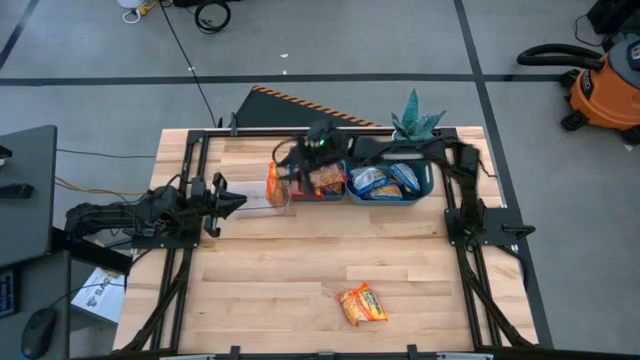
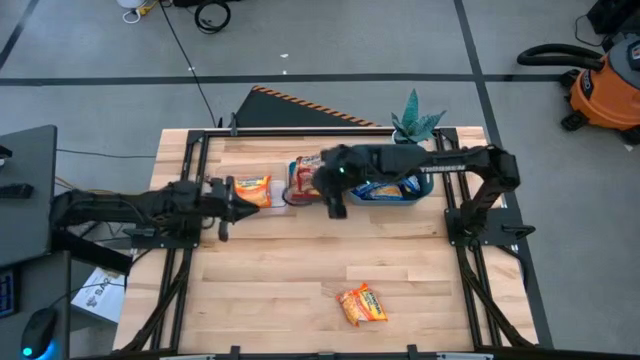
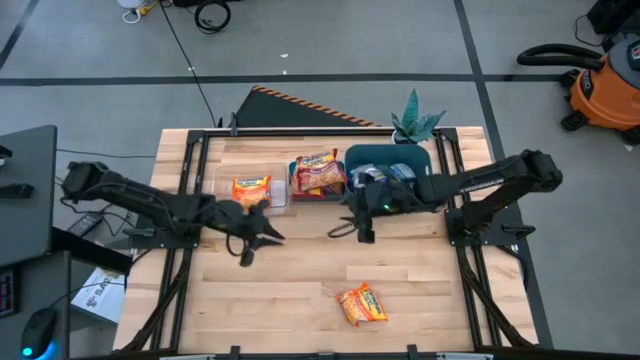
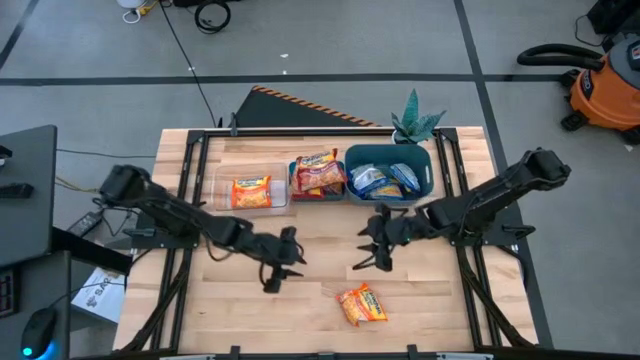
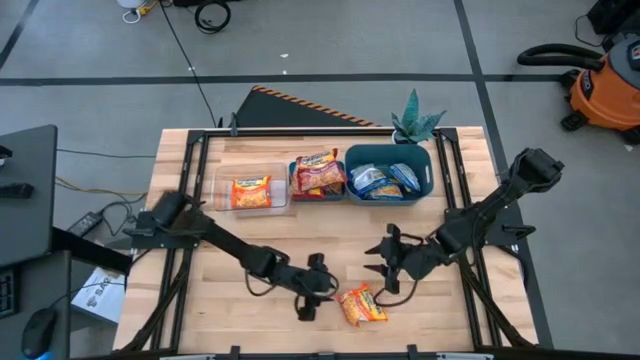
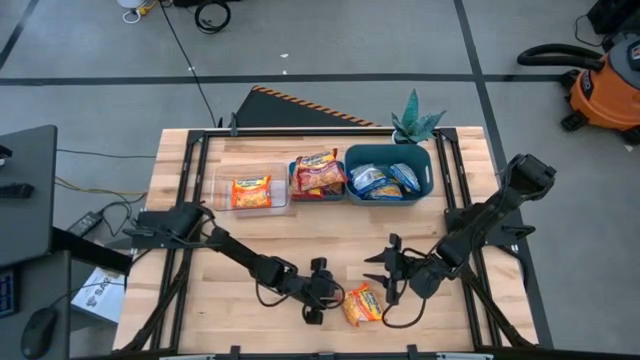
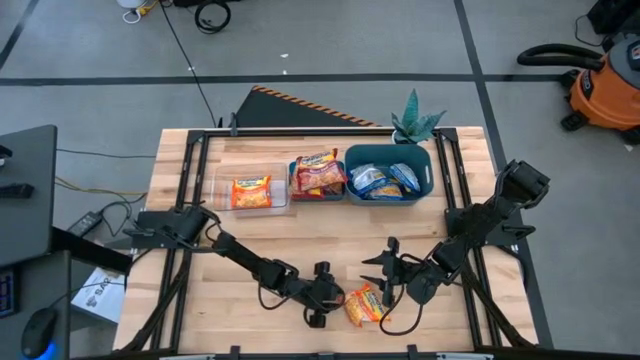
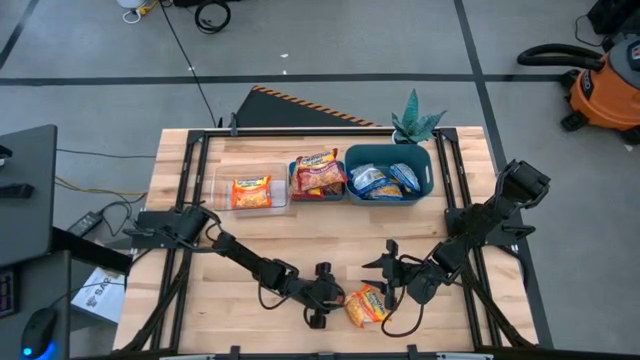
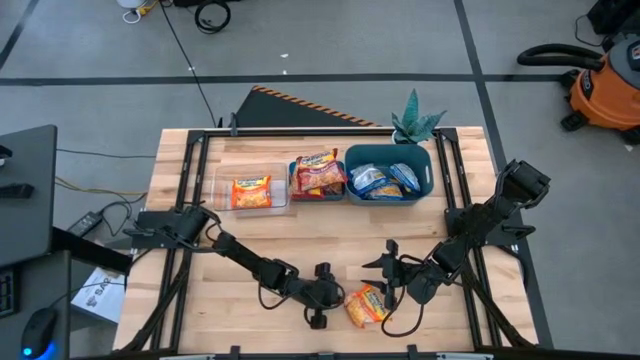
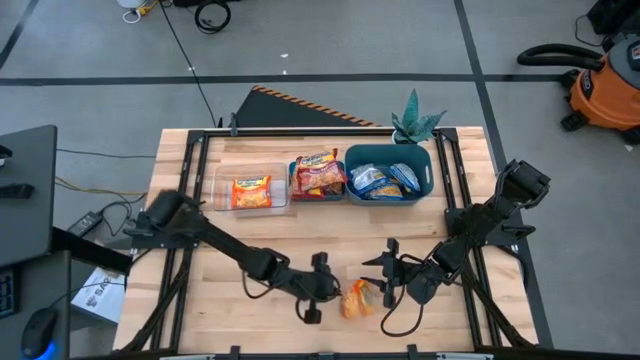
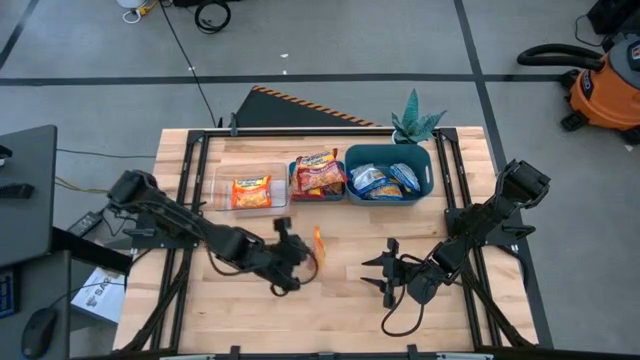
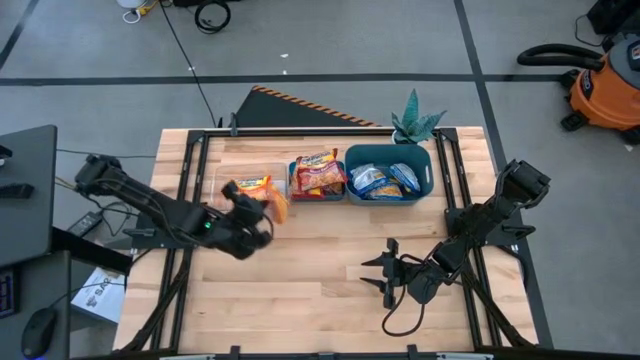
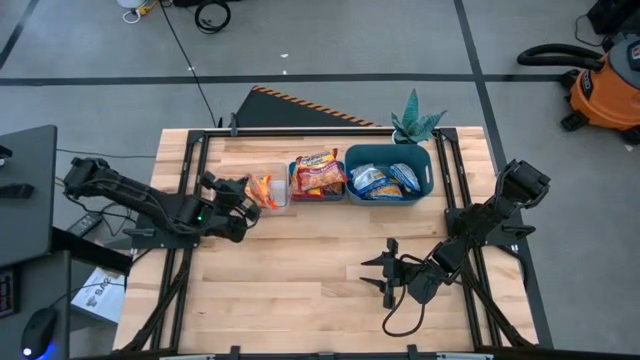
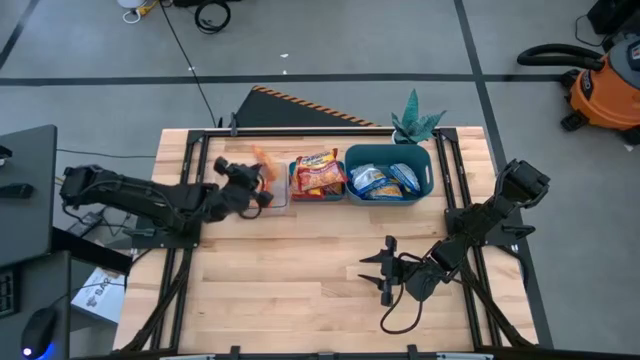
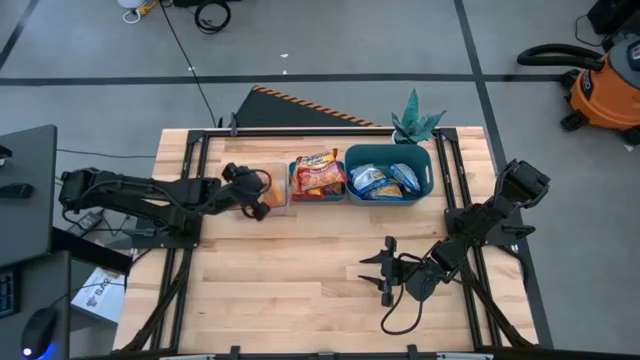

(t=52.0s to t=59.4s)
Task: Sort Maruchan noodles
Put the orange bag into the transparent bin

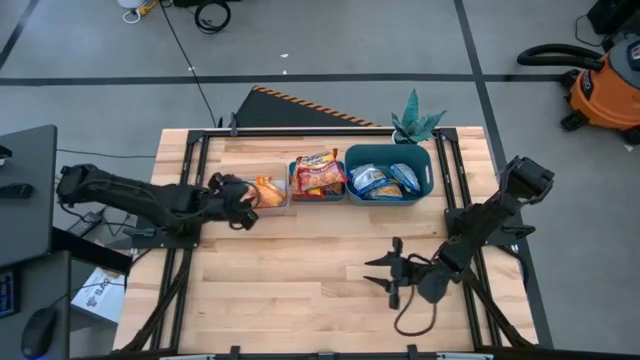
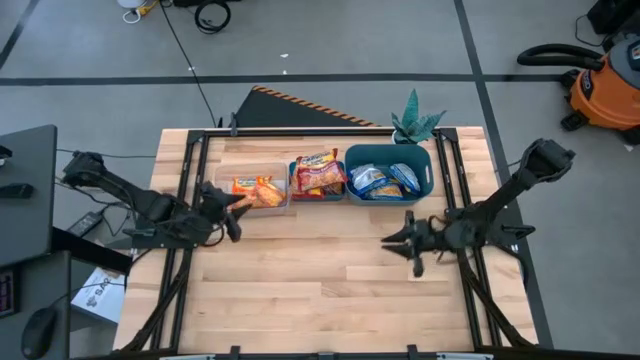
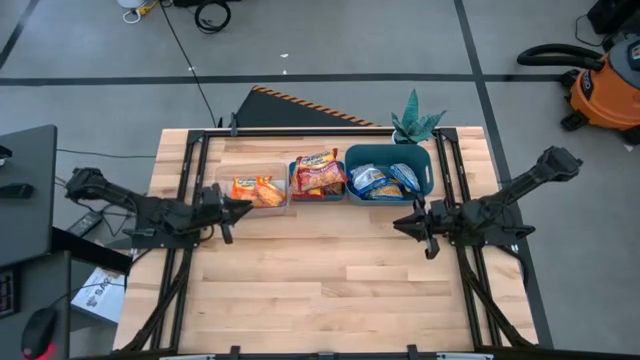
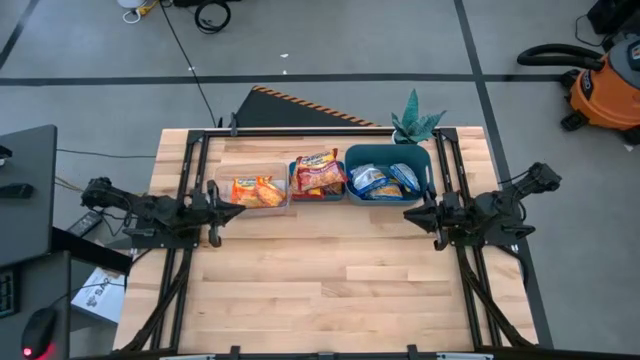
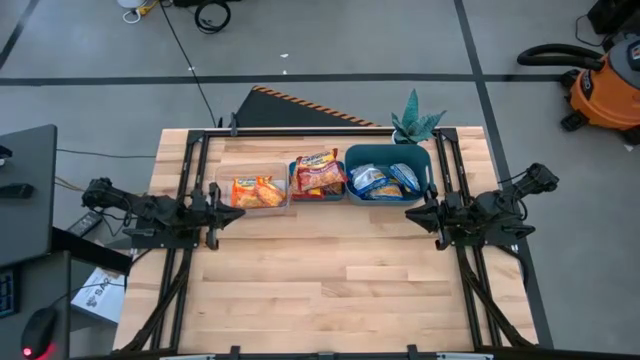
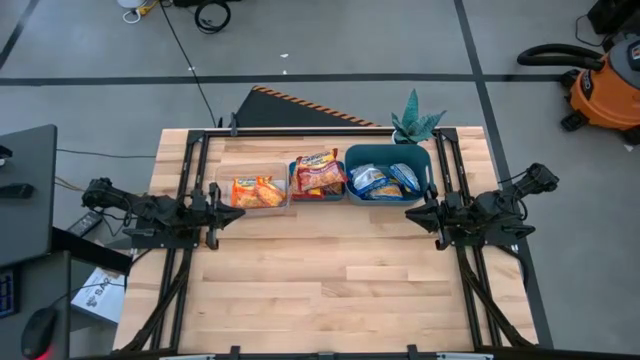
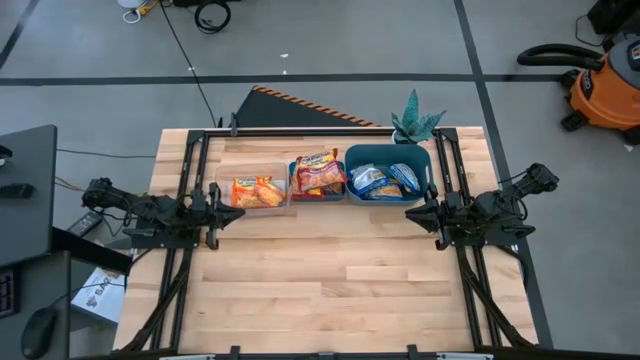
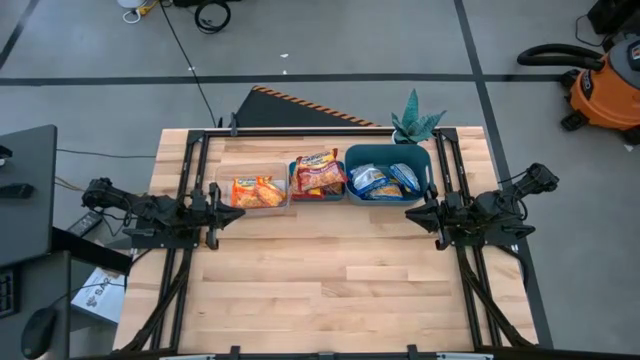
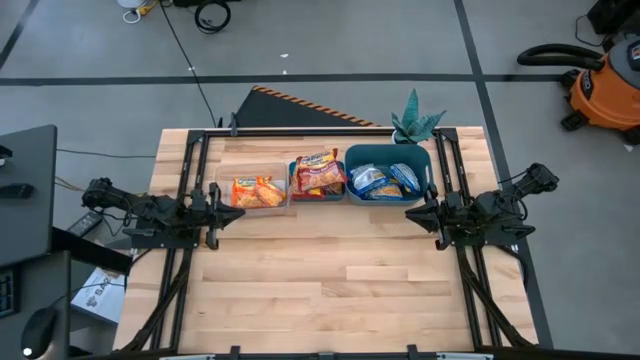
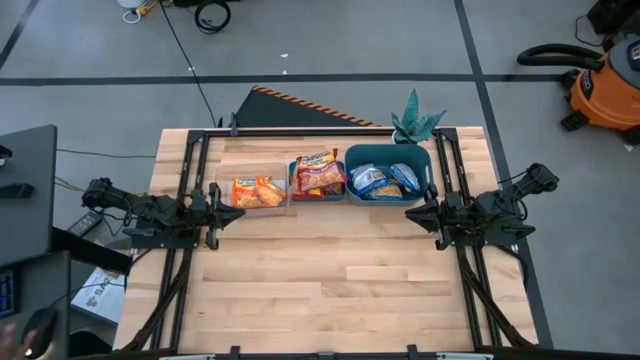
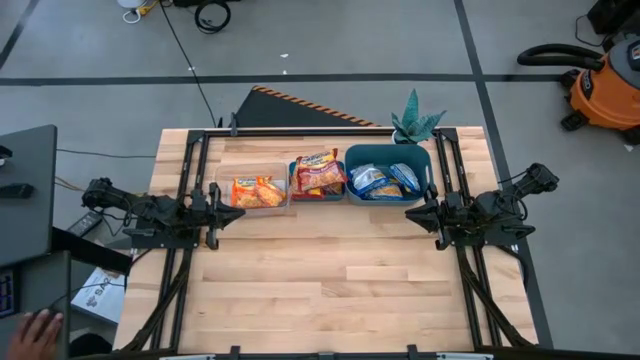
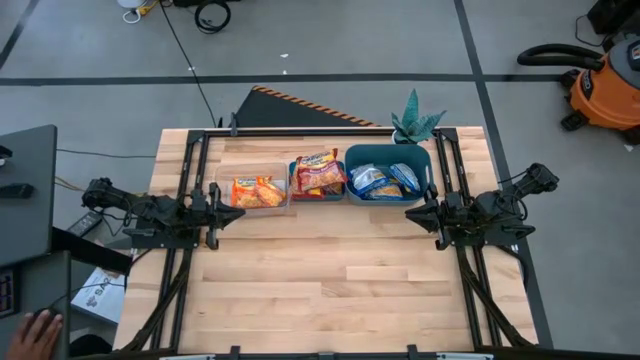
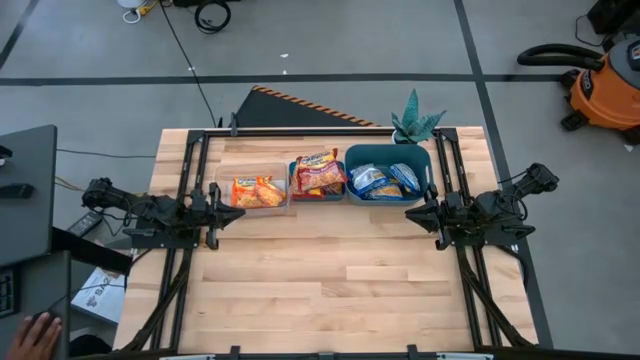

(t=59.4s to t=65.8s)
Return to Home Position

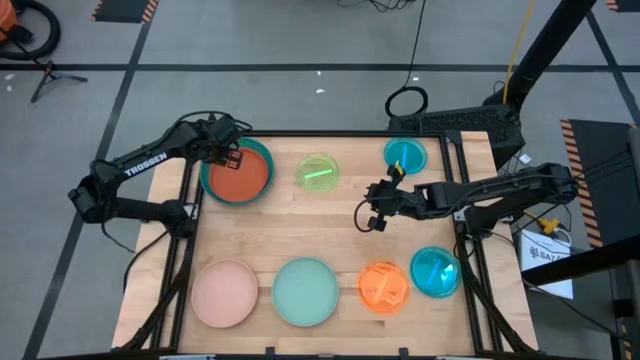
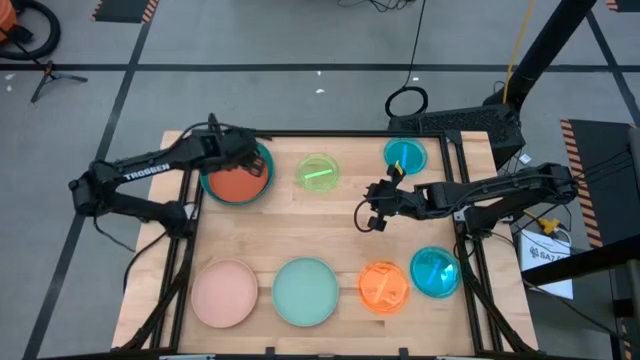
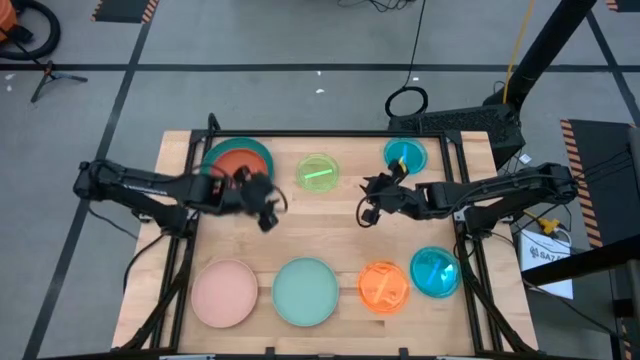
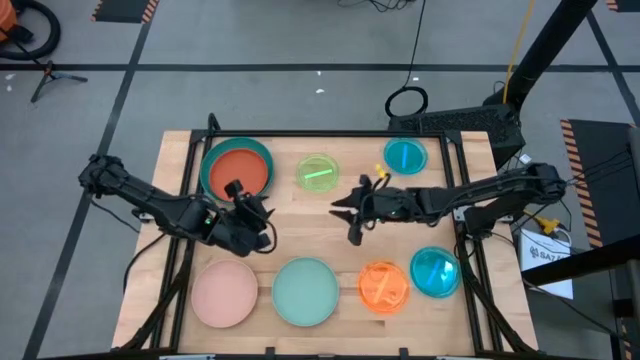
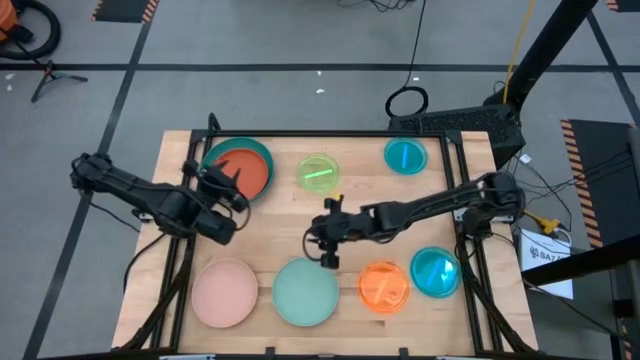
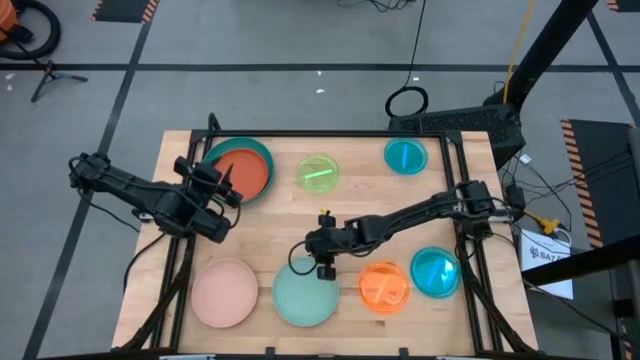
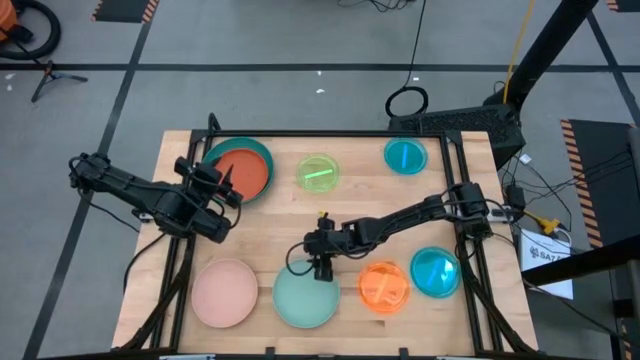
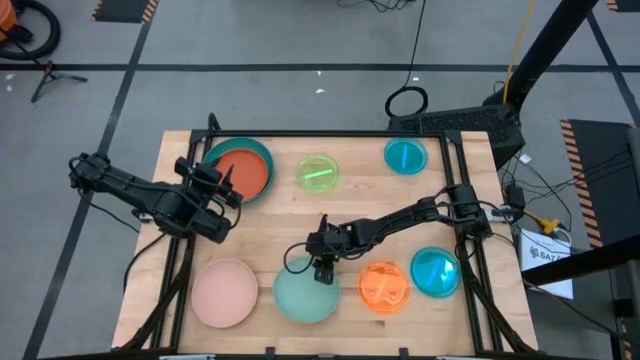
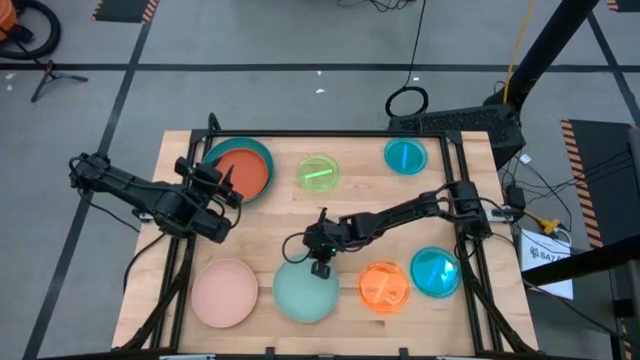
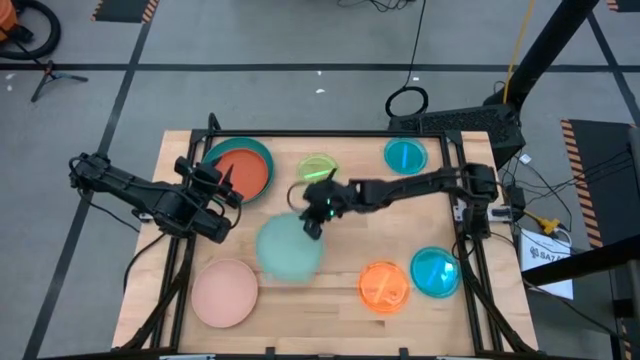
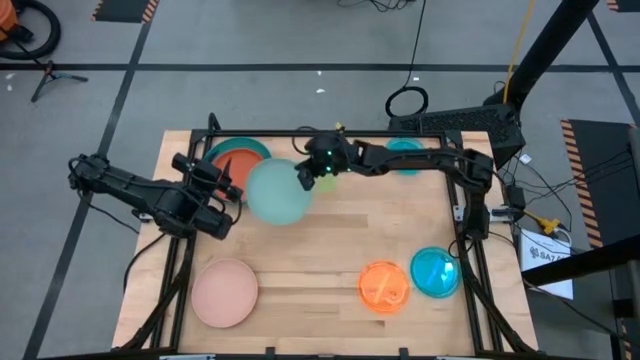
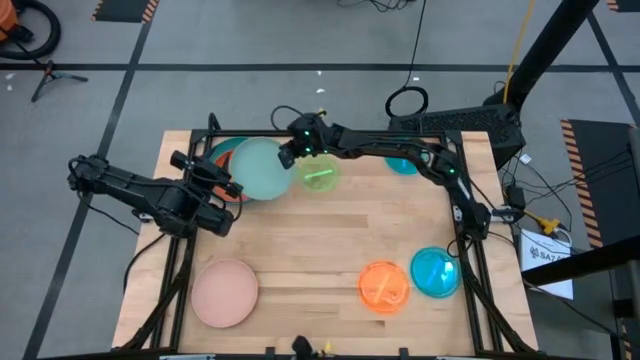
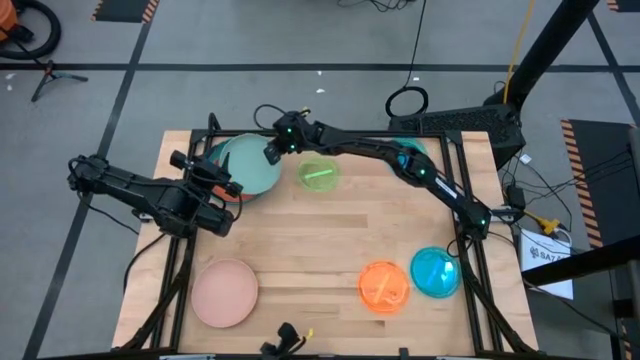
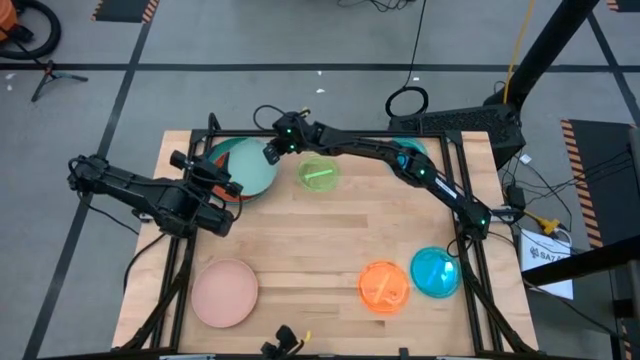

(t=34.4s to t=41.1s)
Task: Stack plastic plates
Stack the light blue plate on top of the dark orange plate
